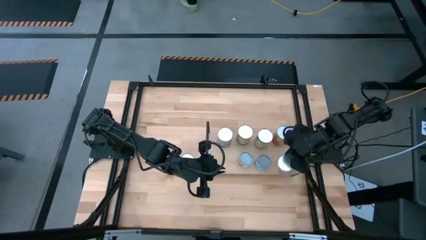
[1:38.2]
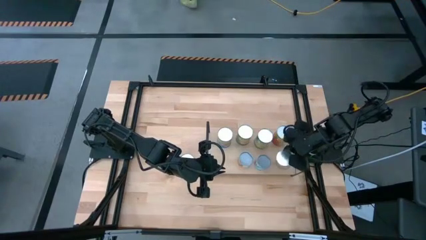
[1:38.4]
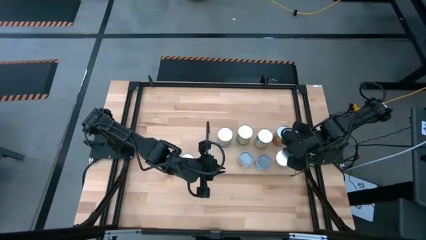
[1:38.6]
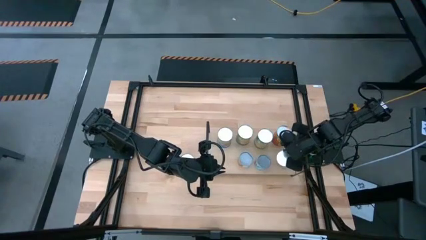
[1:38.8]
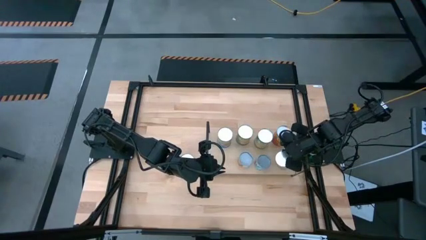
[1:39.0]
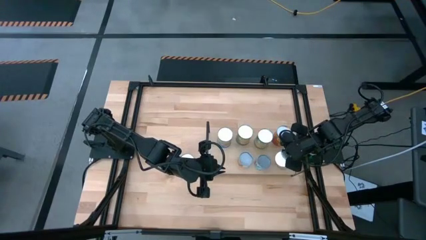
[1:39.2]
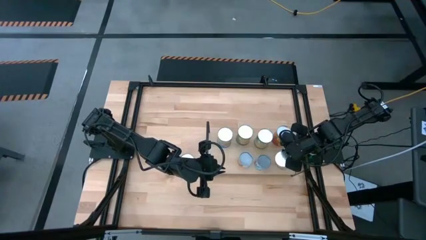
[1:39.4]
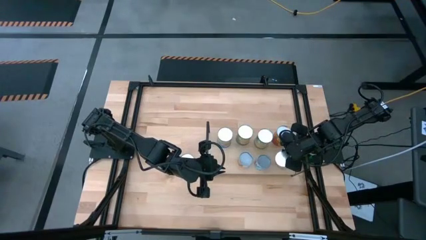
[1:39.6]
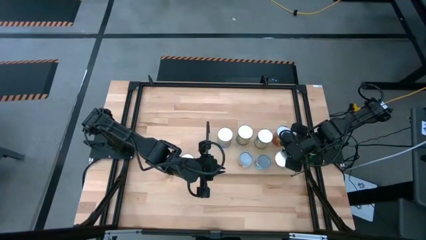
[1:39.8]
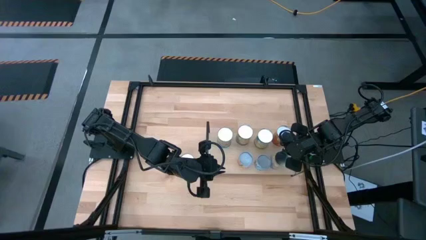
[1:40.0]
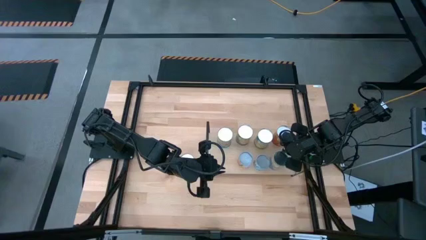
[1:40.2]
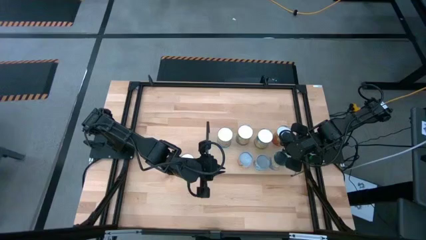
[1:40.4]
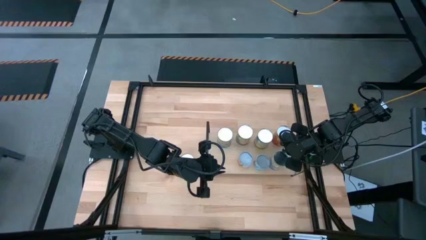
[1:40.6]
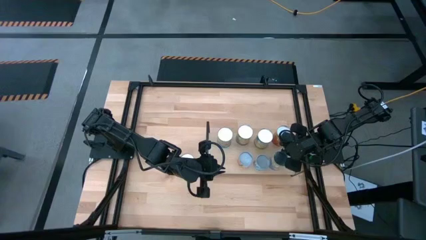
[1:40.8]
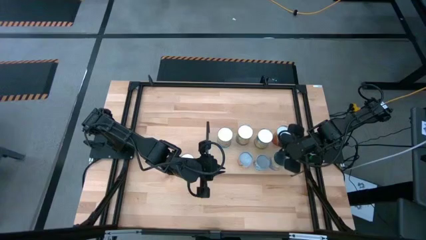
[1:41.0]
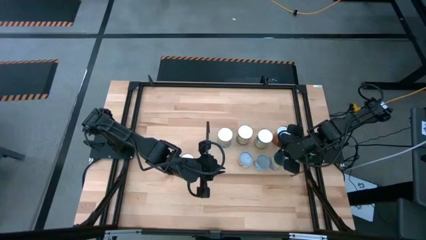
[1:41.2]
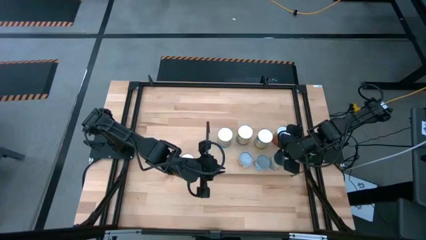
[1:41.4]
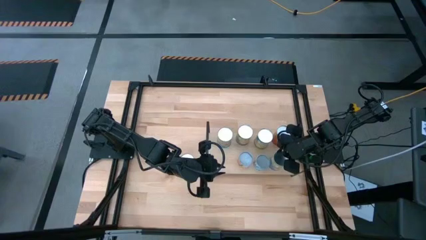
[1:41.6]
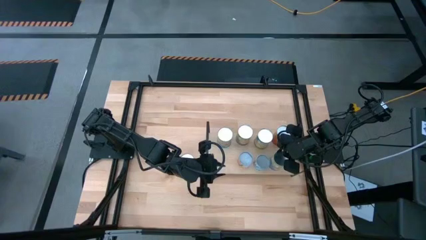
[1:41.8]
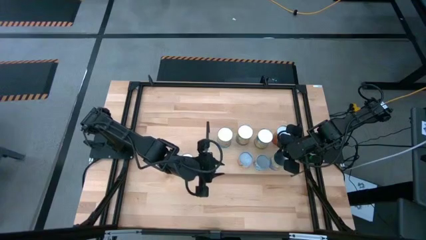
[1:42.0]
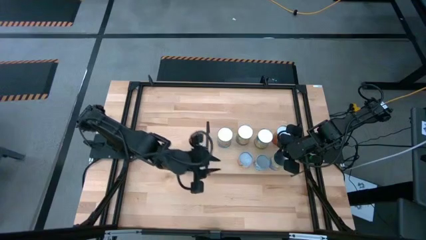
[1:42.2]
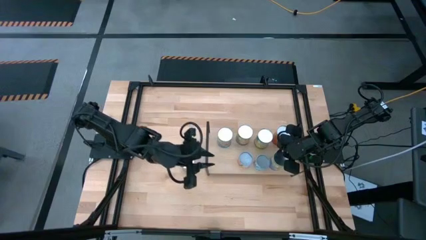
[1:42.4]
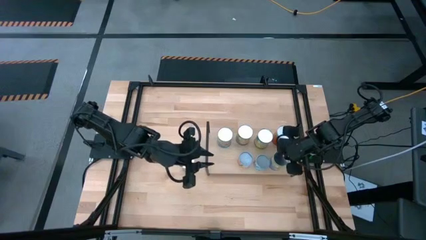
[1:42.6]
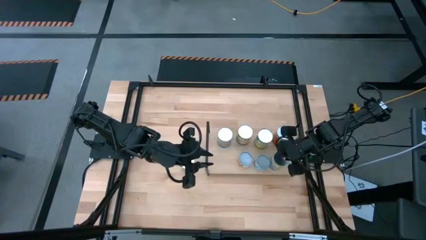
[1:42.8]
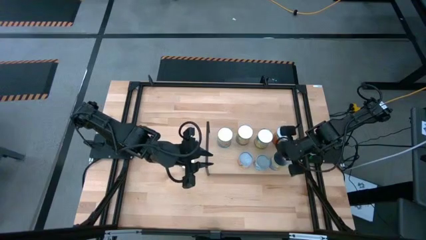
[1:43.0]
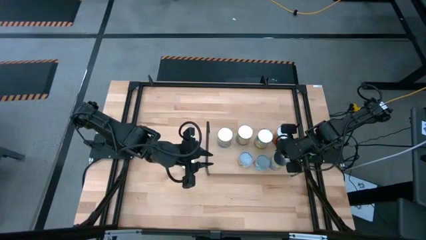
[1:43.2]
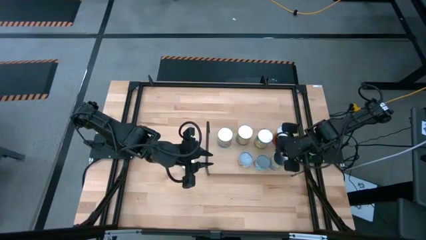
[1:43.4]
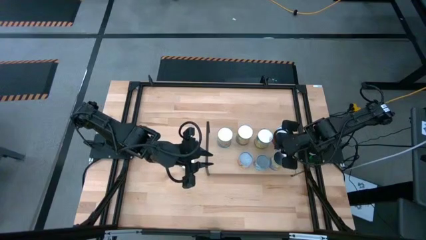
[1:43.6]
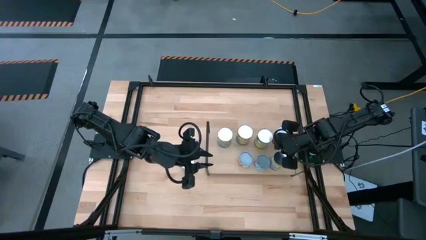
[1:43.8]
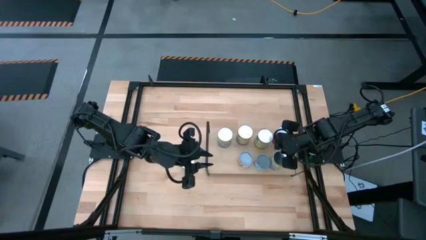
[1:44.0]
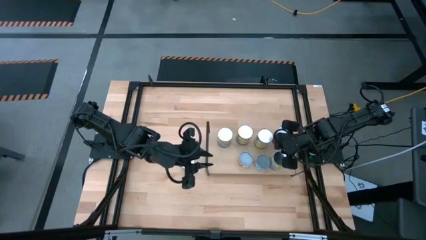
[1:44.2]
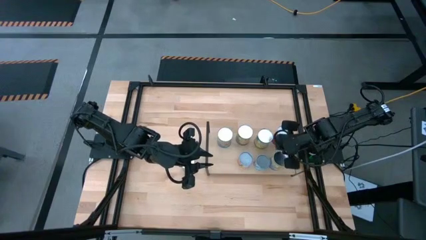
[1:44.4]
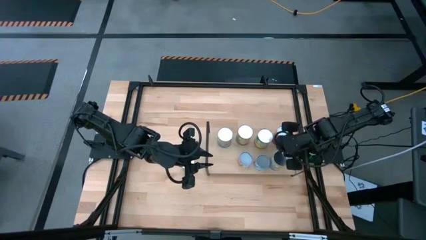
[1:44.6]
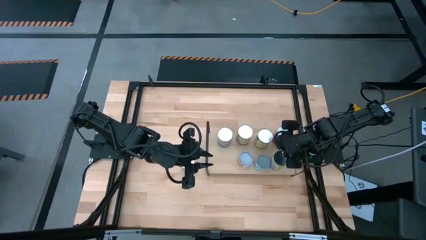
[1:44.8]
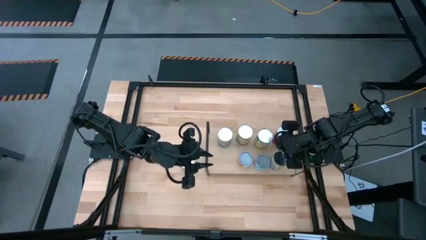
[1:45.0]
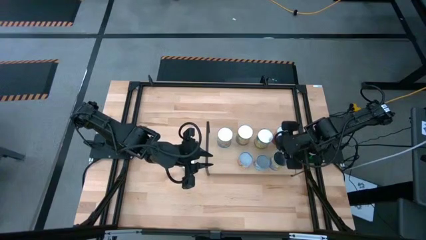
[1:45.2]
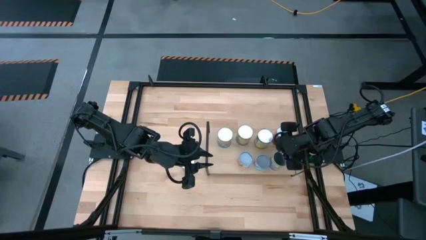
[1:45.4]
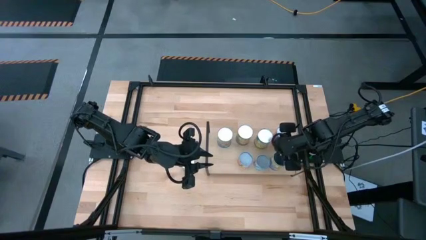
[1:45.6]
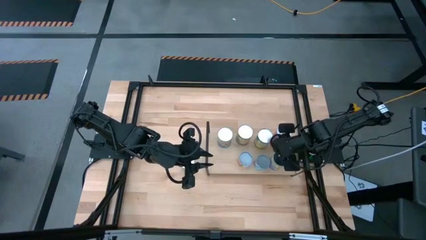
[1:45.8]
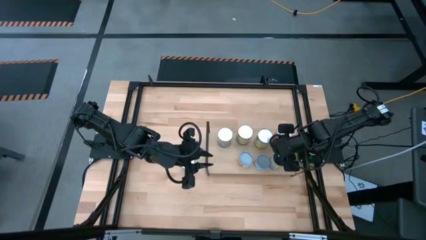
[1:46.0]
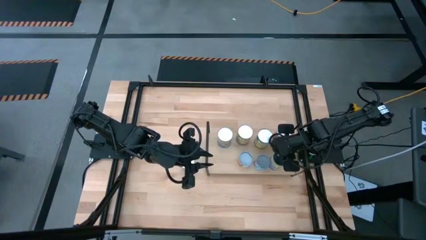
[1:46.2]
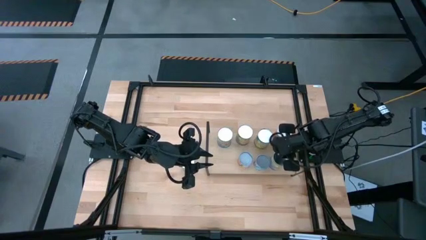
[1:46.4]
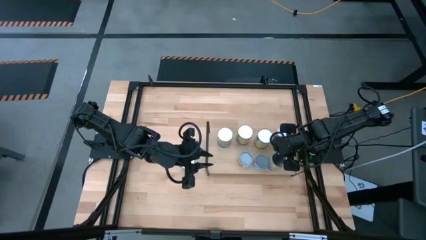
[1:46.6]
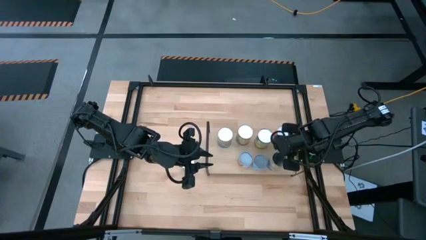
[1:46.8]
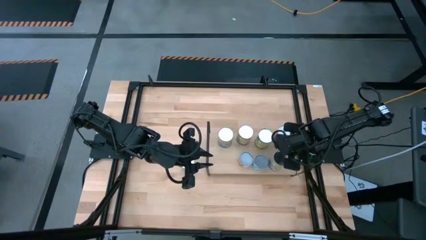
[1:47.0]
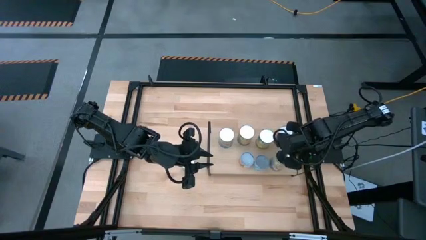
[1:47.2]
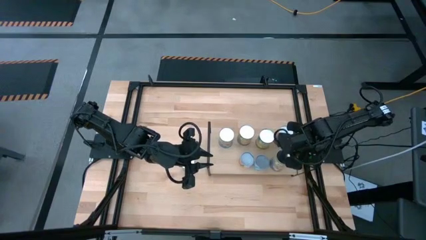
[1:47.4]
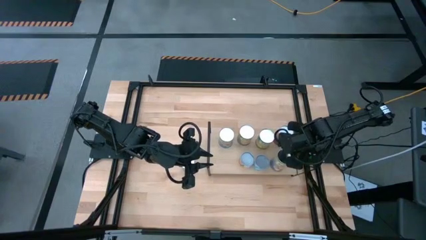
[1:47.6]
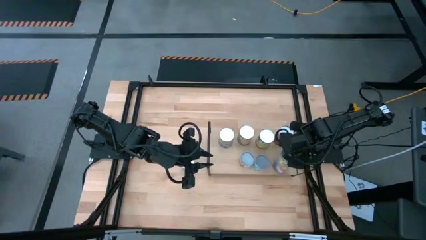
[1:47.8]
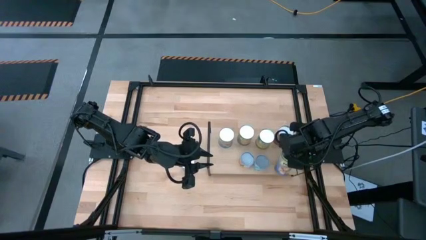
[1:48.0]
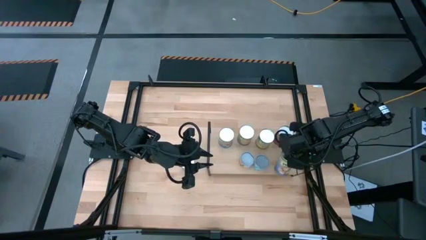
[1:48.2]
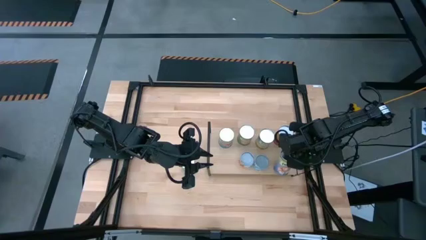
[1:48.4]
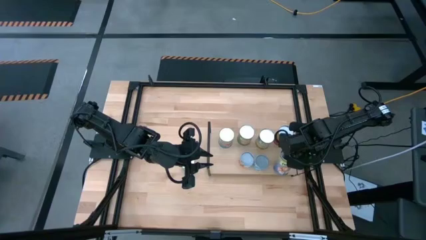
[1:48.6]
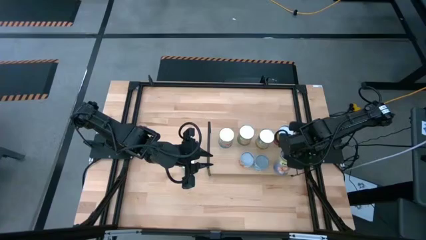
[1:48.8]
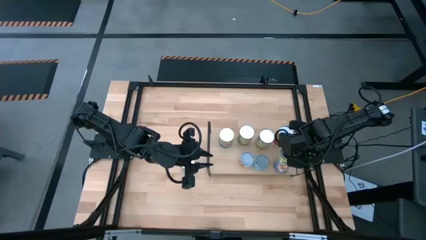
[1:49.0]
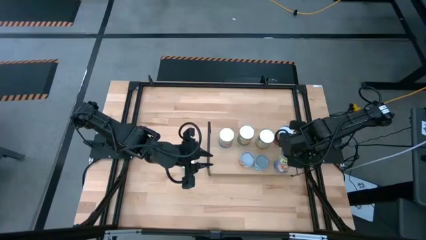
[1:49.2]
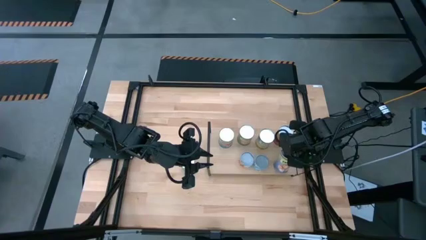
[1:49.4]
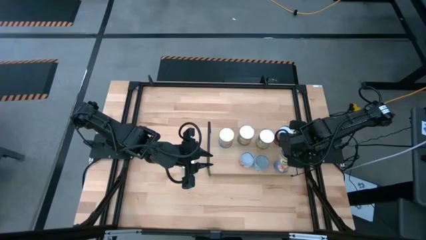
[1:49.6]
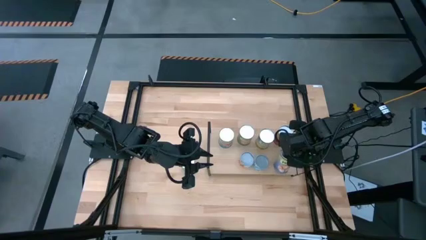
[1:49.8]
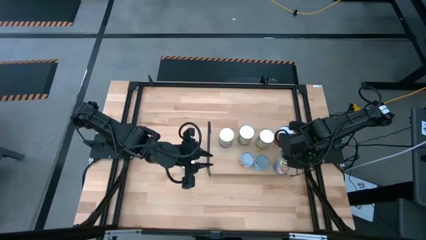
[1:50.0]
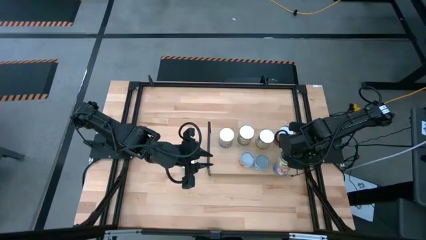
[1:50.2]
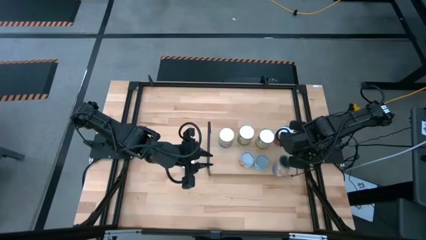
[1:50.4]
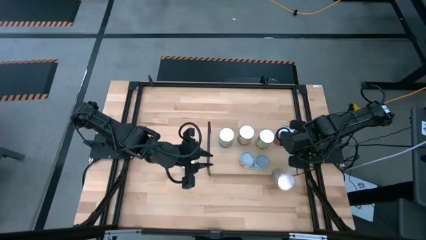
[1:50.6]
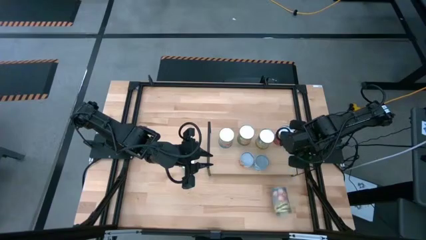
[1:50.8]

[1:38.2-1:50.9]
Task: Pick and place cans onto a shelf
Put the canned peaches on the shelf
